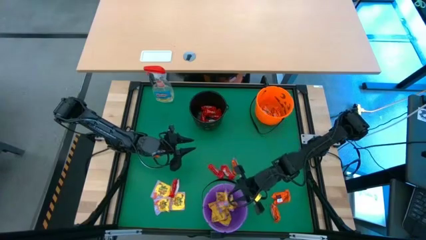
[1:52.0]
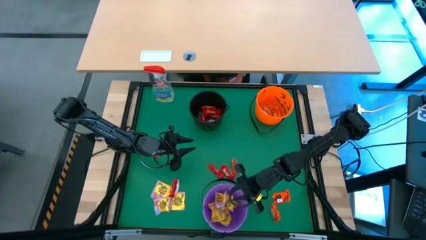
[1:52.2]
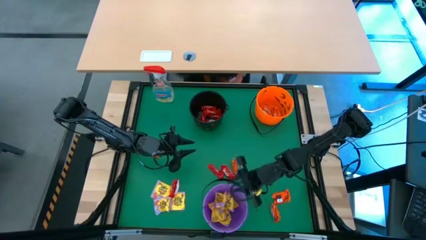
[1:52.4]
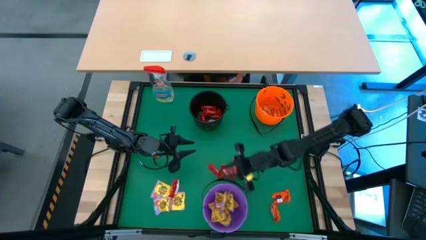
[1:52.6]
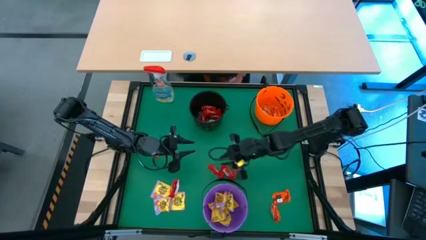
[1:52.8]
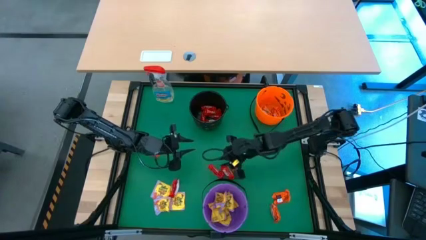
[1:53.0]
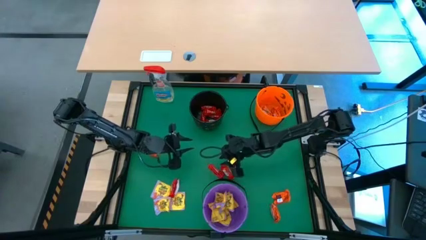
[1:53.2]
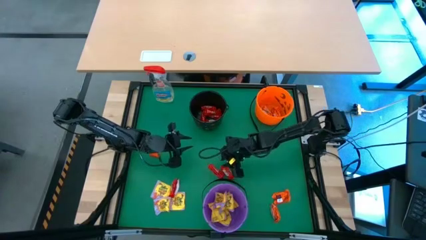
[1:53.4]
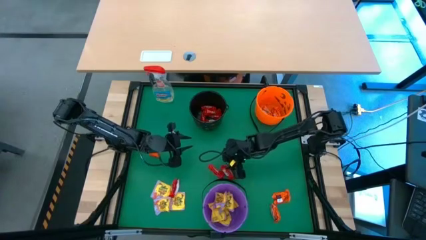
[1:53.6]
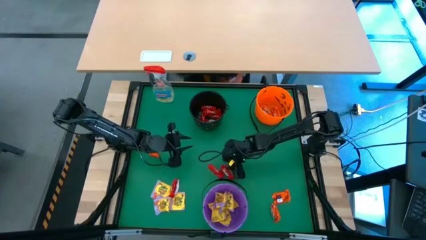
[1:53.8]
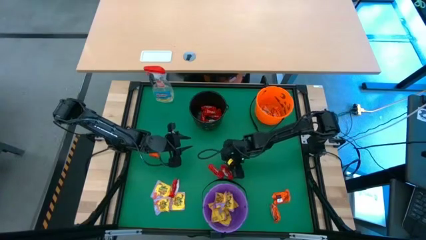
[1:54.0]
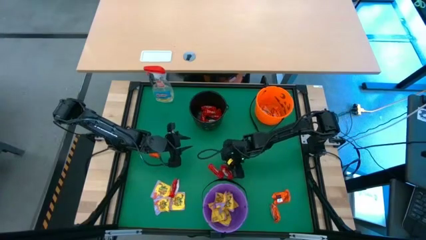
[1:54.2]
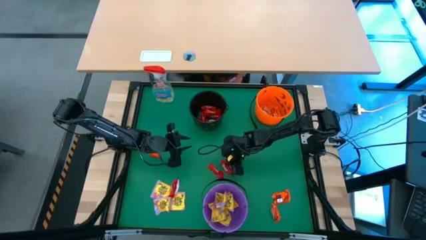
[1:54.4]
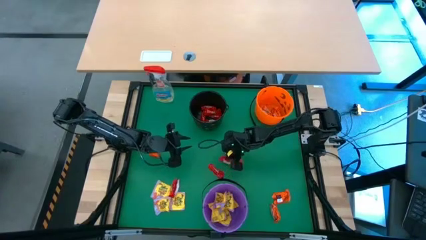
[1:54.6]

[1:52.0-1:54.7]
Task: Sort candy
Put the red chocolate into the black bucket

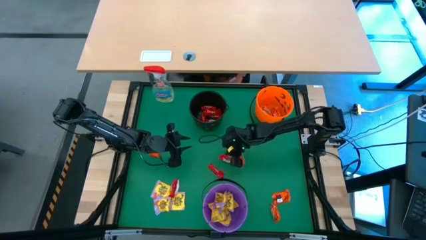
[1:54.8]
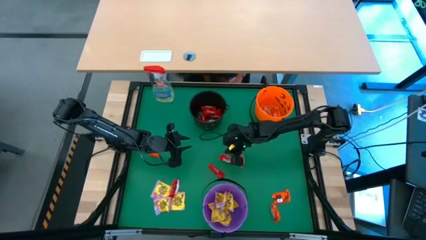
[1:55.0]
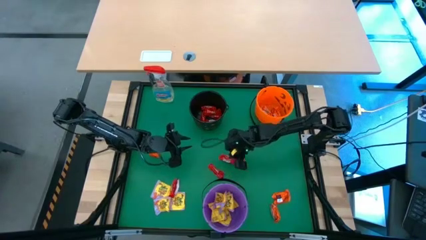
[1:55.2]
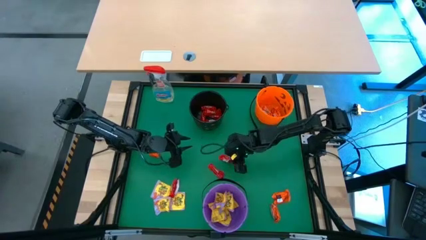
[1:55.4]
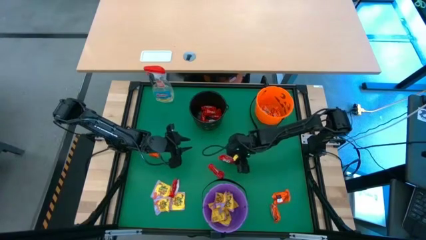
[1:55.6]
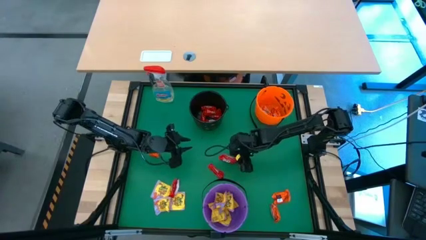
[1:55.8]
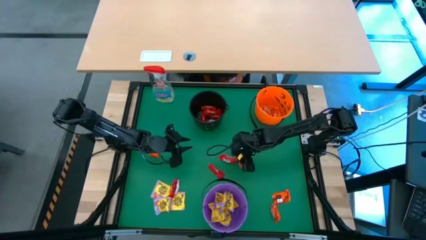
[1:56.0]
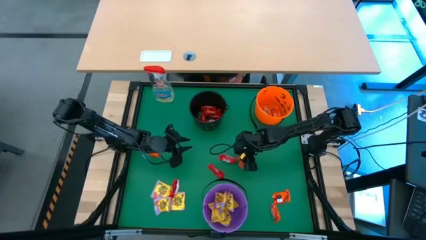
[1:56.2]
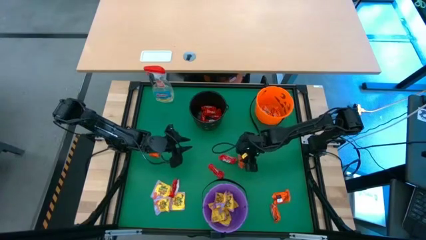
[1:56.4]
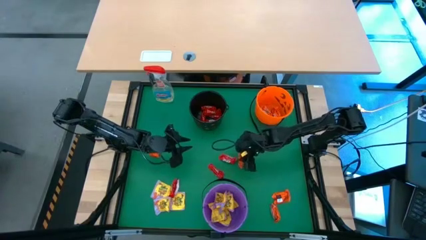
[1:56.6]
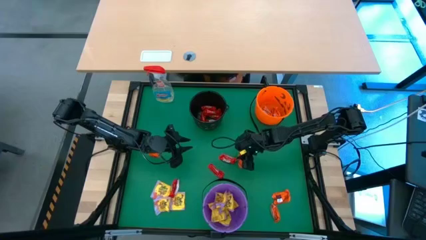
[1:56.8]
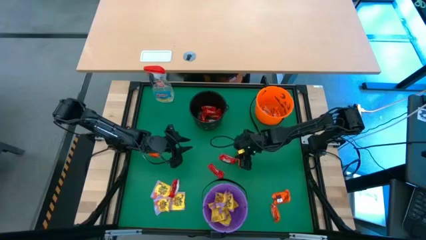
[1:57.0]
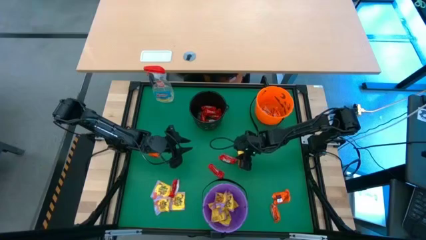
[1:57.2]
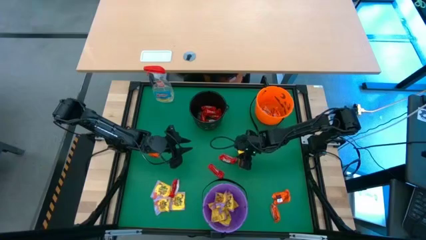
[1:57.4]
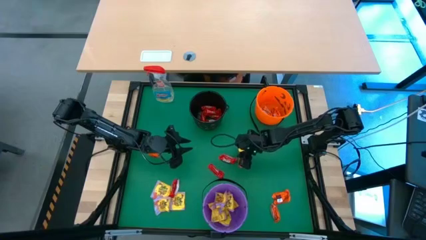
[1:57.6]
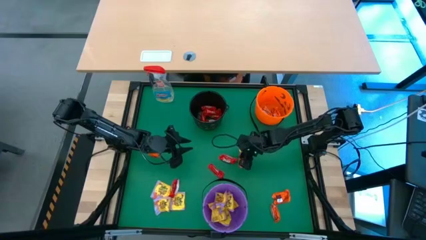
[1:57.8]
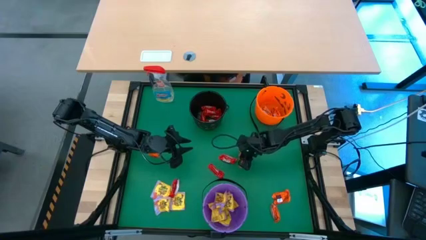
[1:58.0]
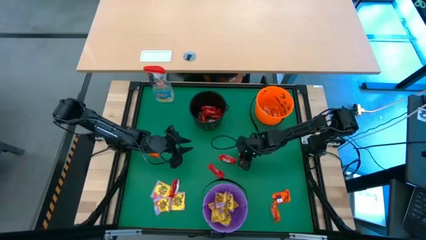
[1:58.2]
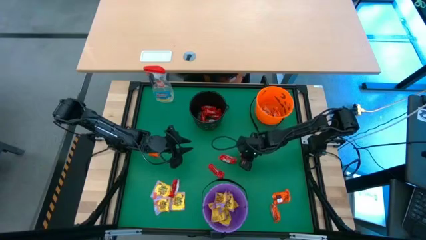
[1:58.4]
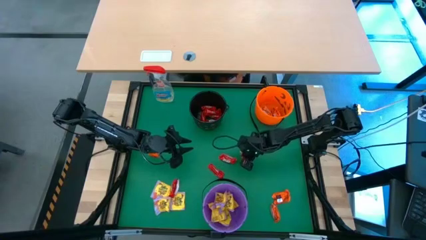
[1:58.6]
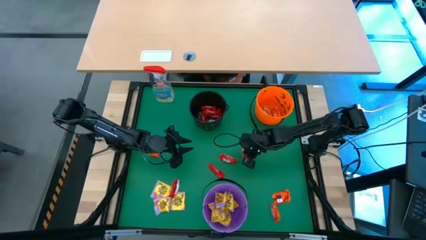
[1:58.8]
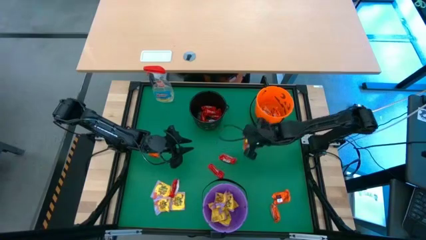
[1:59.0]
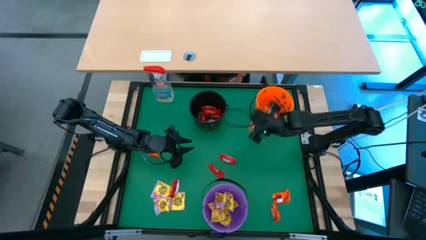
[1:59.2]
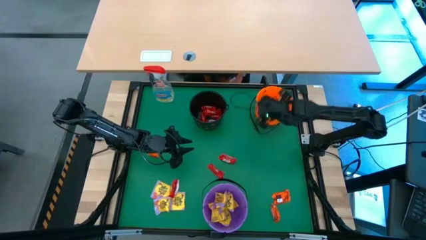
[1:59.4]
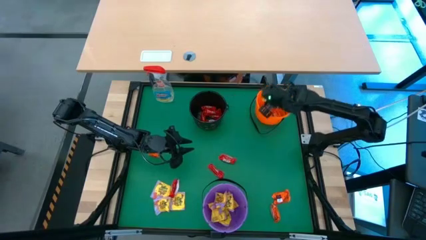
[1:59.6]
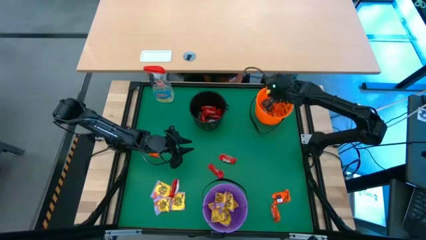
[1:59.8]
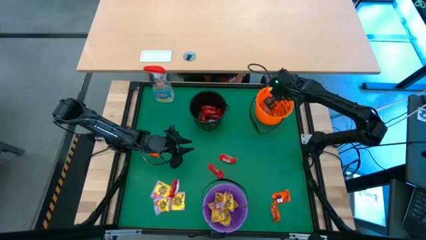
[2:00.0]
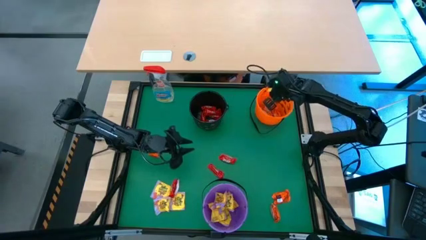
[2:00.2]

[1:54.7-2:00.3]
Put the orange chocolate into the orange bucket

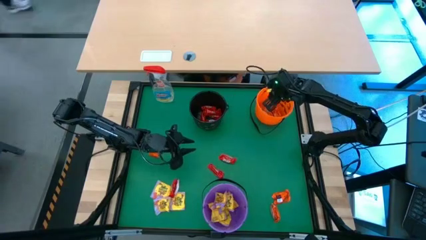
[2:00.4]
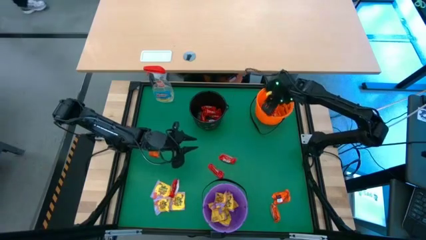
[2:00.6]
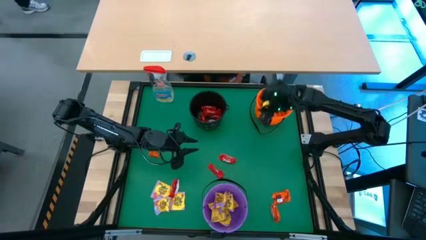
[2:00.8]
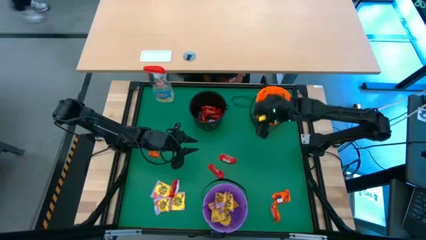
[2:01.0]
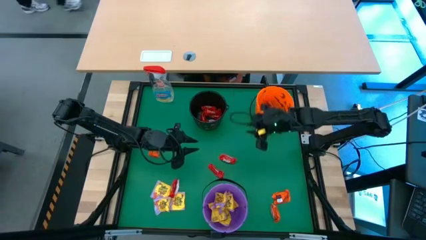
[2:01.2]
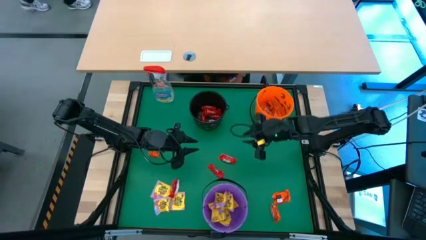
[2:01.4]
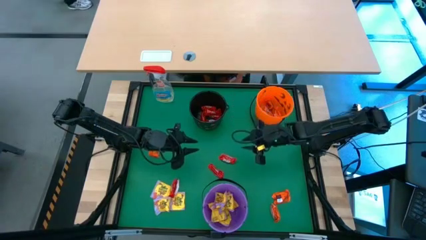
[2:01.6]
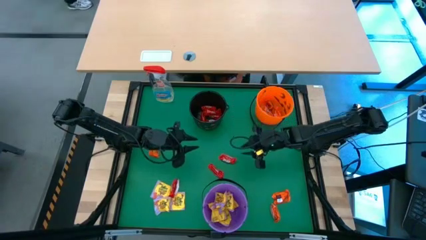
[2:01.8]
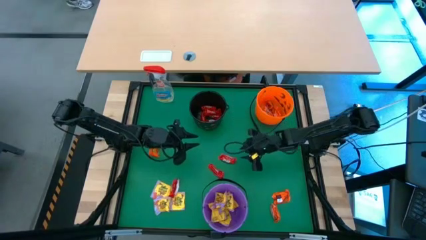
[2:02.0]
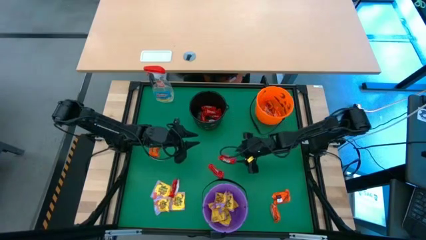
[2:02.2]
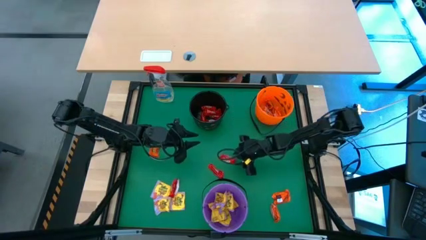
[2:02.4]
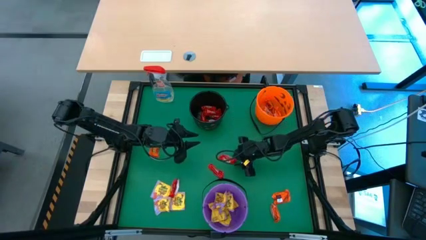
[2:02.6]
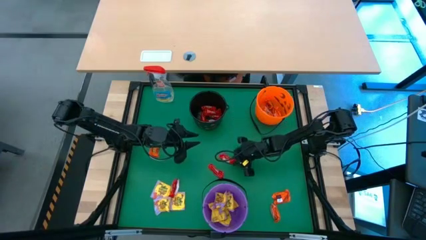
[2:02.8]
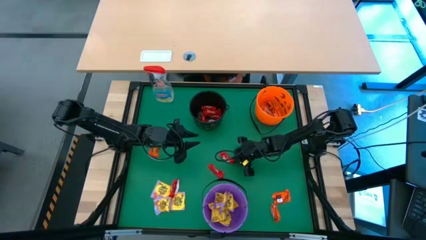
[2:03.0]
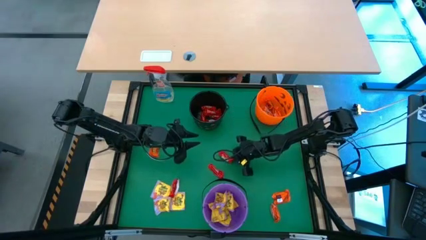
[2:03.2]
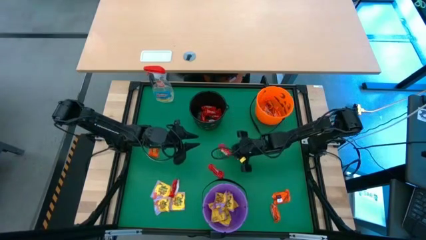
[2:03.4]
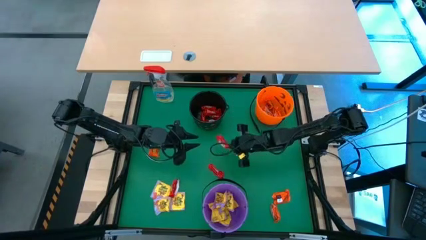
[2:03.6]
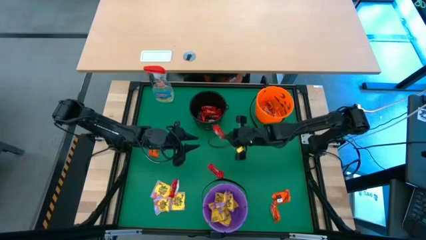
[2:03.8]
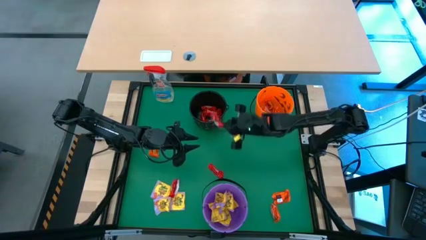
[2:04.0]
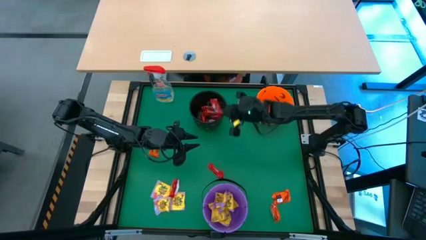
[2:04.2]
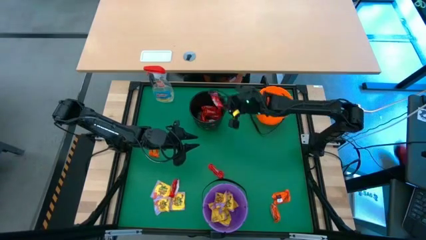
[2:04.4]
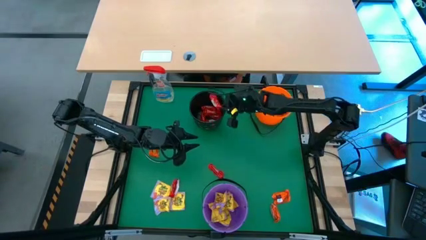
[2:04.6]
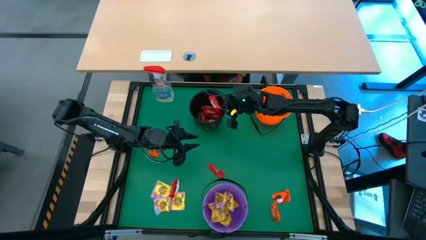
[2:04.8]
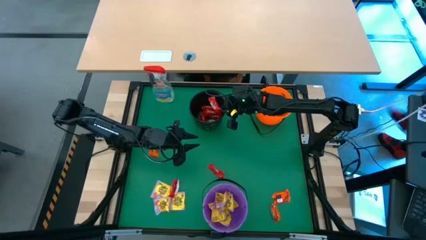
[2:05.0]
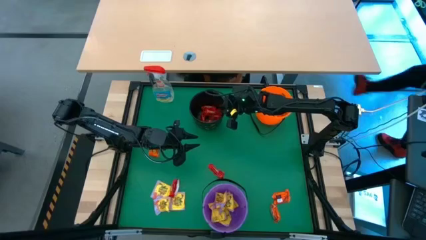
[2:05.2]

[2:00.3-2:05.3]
Put the red chocolate into the black bucket

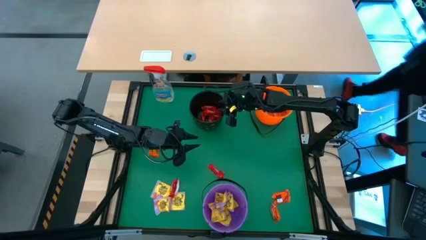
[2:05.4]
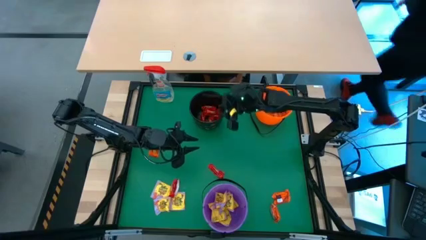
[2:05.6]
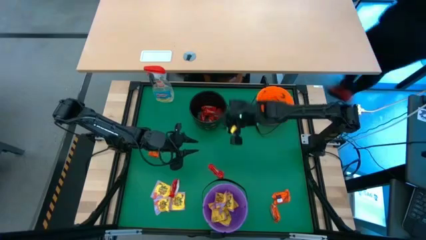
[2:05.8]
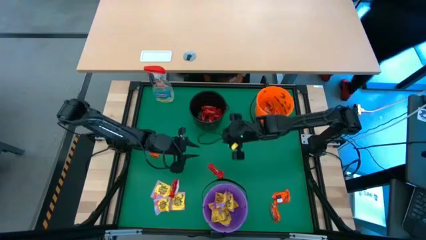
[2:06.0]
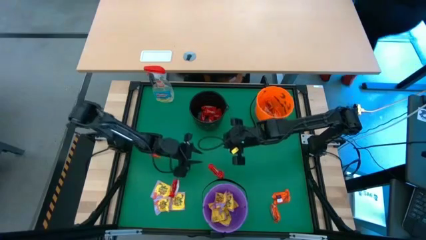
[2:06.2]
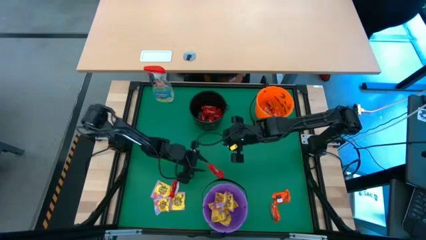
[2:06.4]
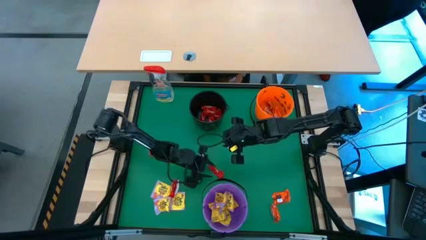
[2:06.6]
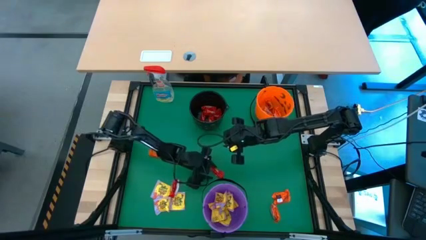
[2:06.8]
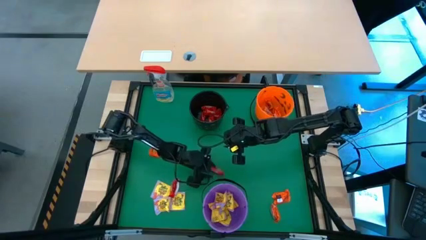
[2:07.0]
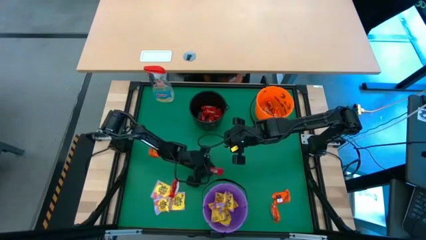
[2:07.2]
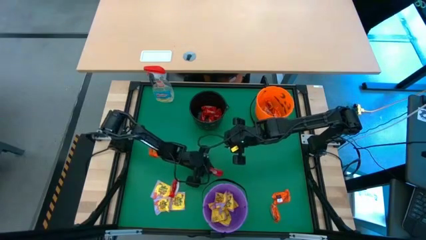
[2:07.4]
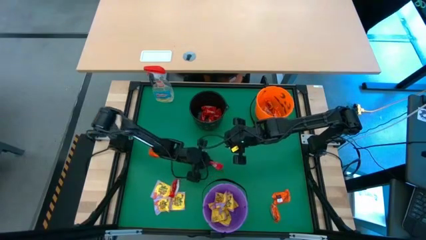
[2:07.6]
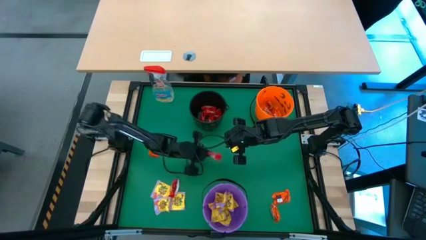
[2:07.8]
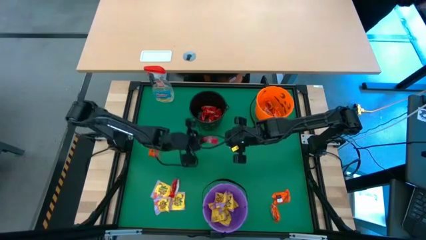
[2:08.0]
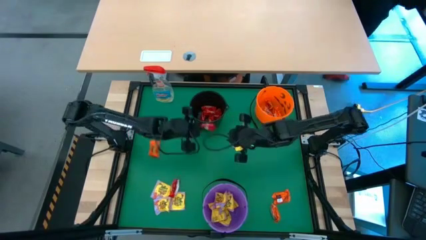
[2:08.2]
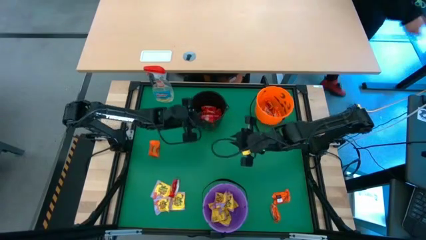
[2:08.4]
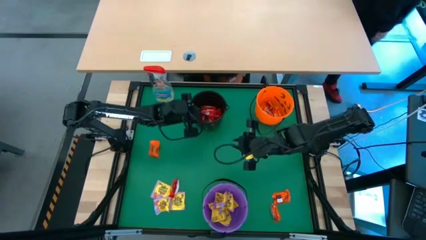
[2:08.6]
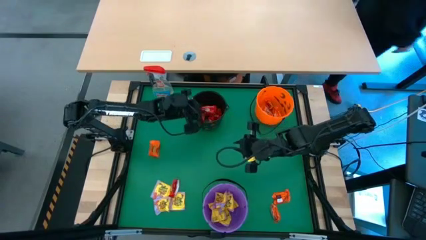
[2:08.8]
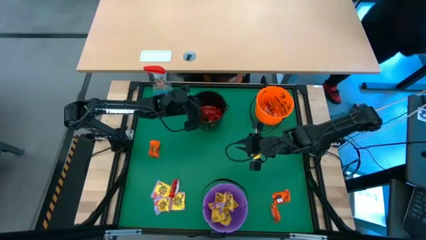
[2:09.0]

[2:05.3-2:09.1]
Put the red chocolate into the black bucket
